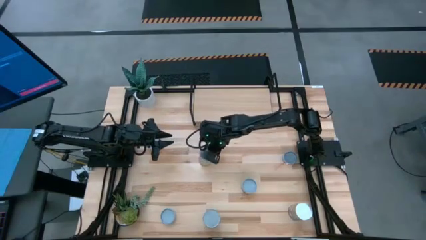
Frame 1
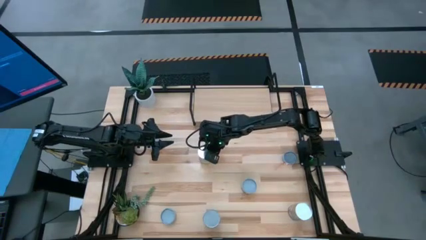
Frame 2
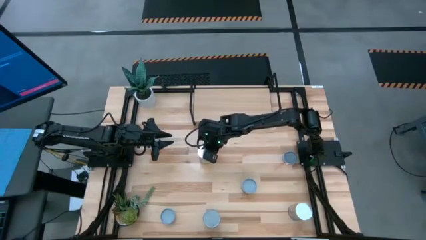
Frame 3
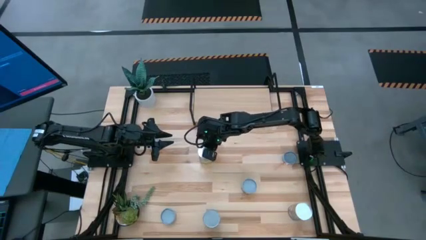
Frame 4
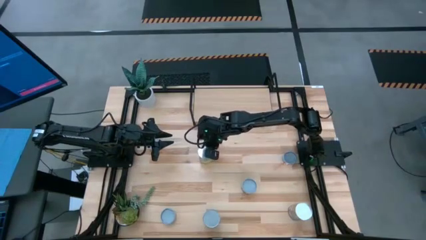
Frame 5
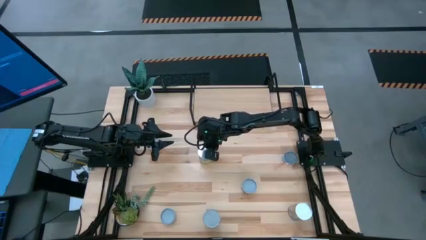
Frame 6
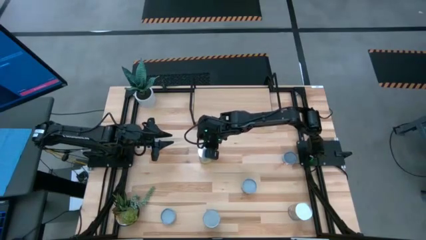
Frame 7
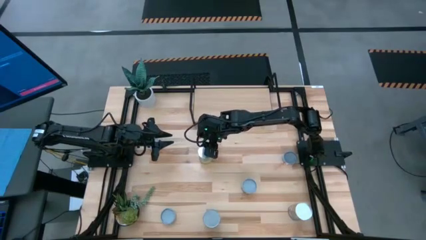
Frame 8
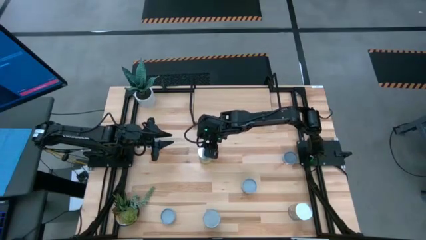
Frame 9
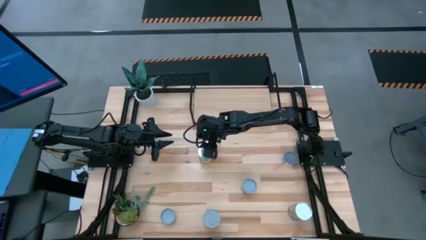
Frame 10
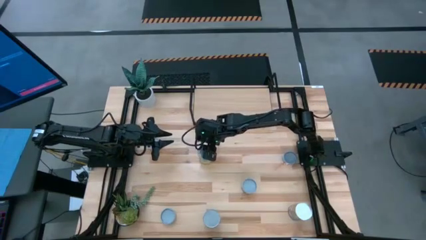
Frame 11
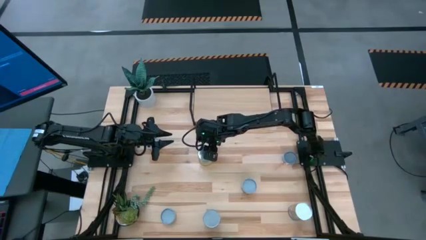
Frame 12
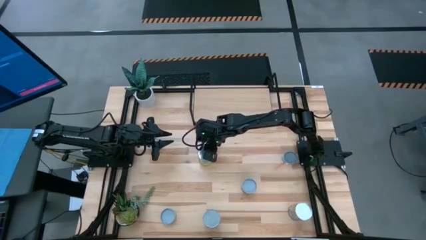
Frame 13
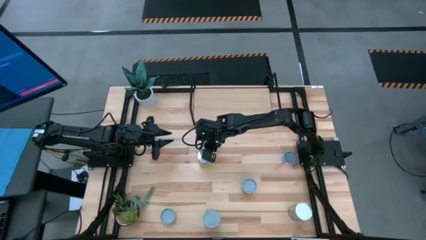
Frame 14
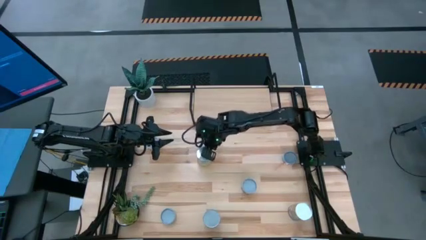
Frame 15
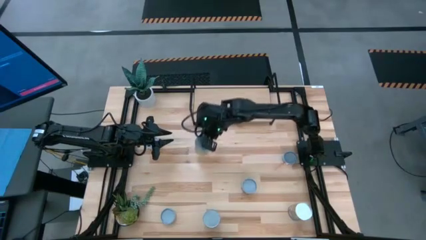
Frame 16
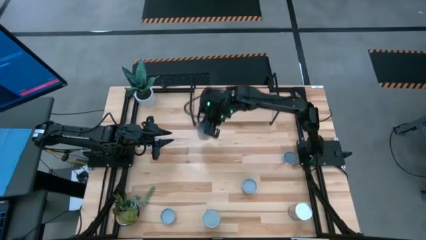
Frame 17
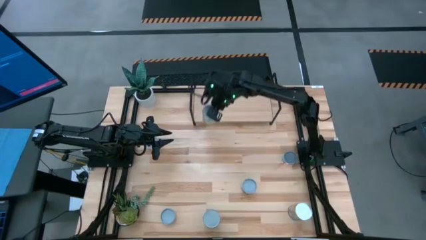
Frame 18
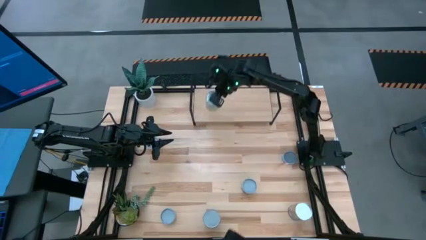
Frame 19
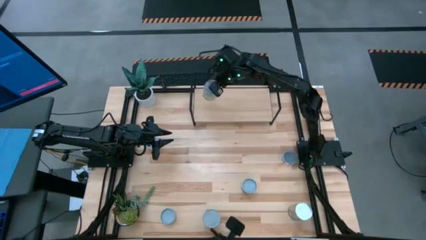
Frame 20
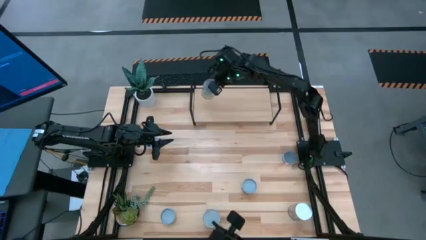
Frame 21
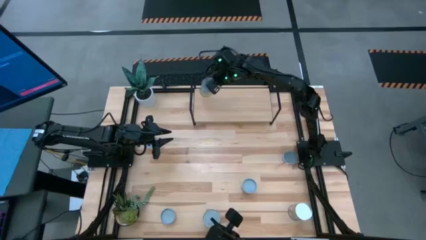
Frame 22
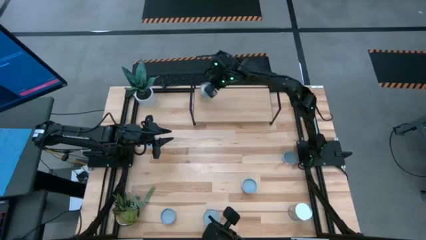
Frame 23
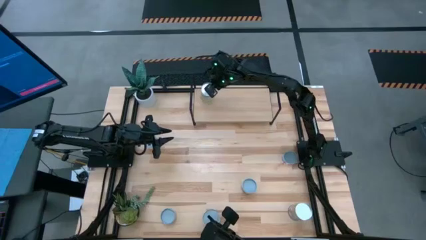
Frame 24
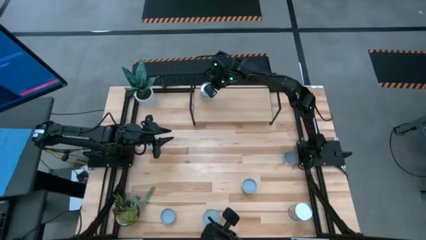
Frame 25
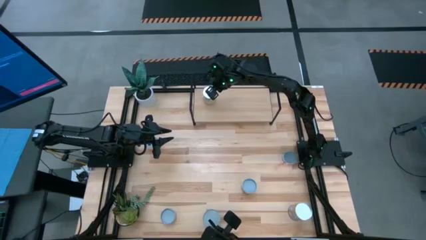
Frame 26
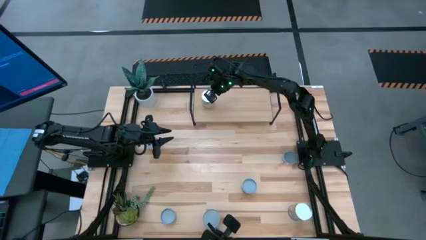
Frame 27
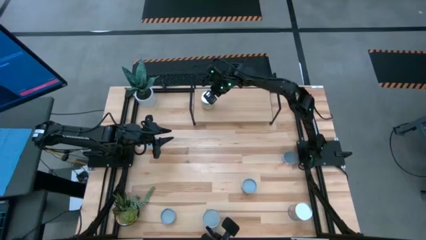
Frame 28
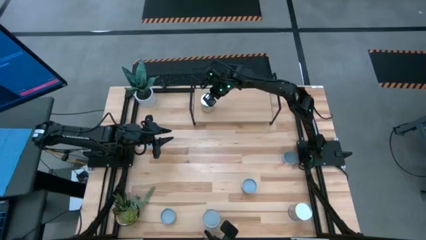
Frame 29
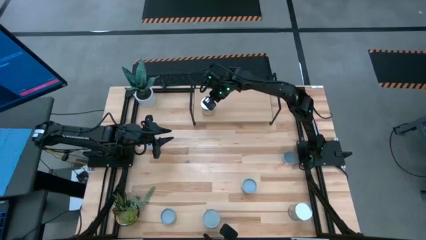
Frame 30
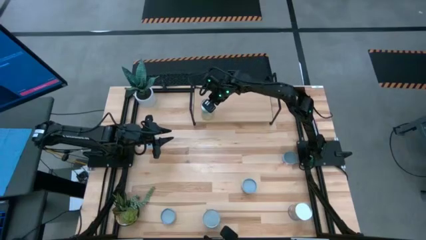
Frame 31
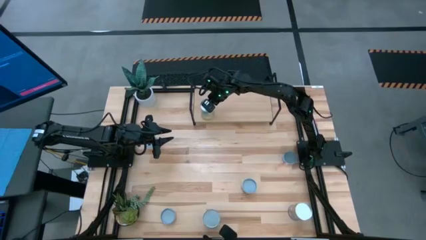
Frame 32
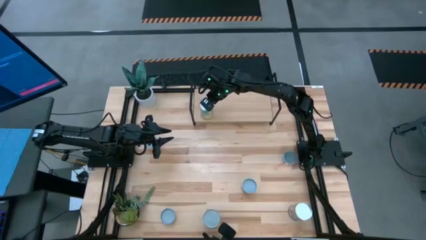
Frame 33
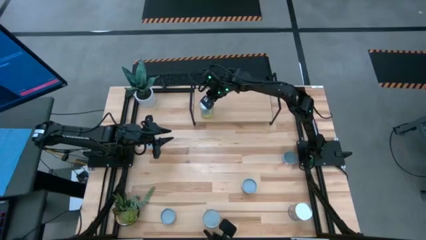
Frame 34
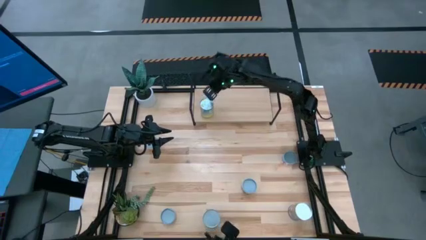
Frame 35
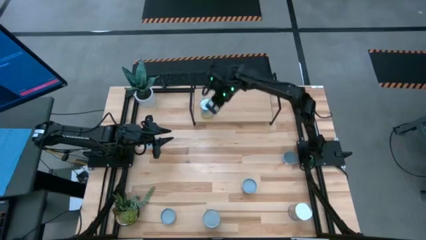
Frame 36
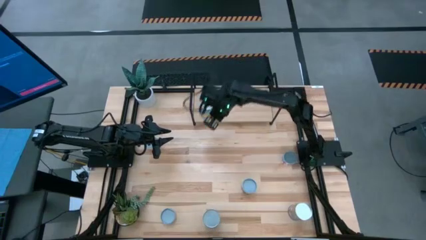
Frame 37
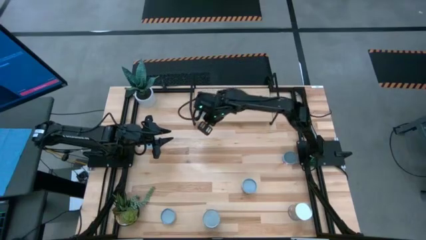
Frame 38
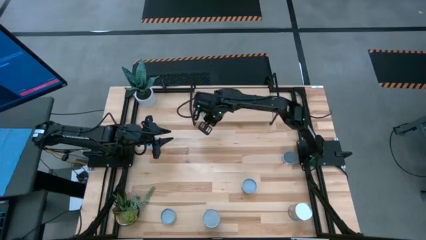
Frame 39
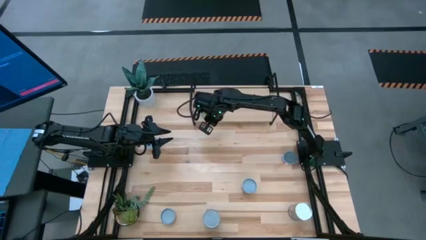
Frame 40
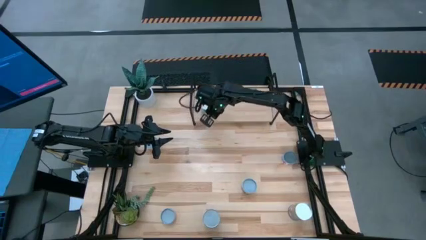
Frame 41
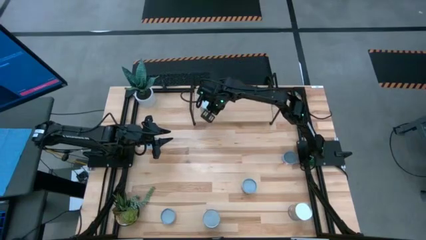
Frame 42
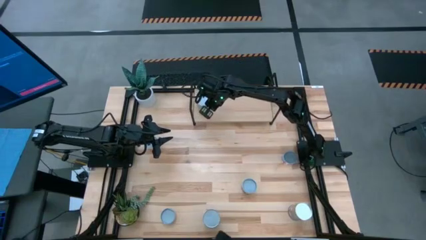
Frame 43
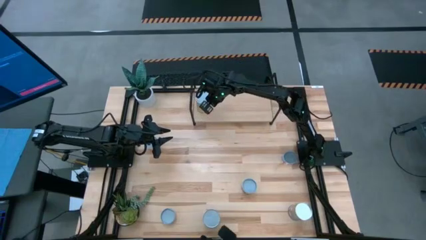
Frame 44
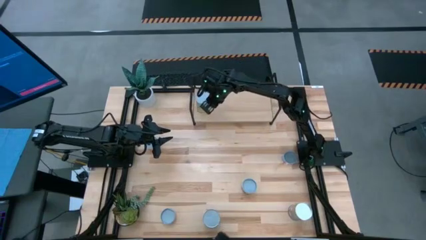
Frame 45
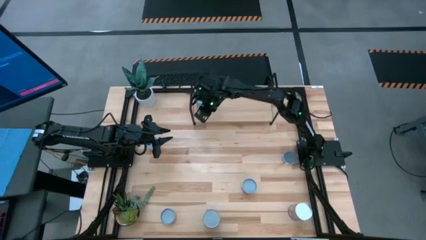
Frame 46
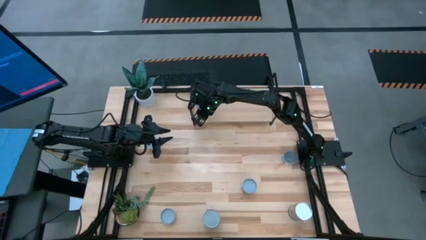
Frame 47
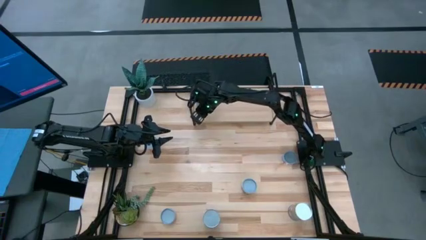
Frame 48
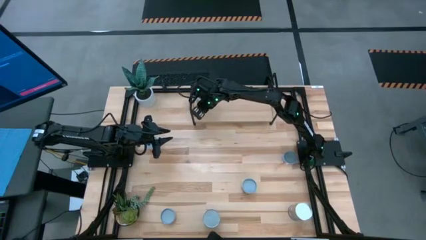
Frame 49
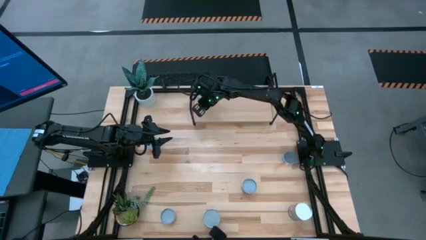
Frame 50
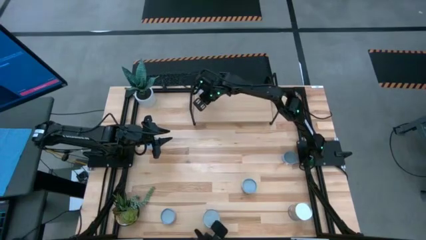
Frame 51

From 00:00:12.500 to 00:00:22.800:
Task: Pick and place cans onto a shelf
Put the canned carrots on the shelf

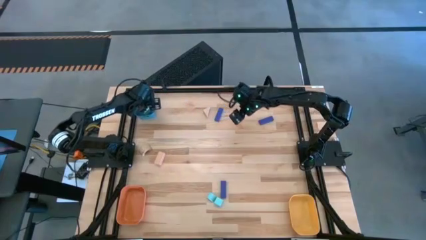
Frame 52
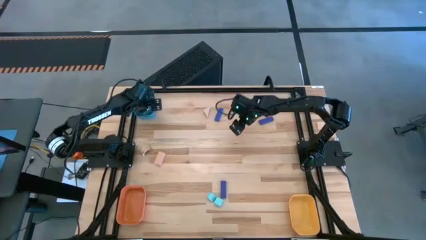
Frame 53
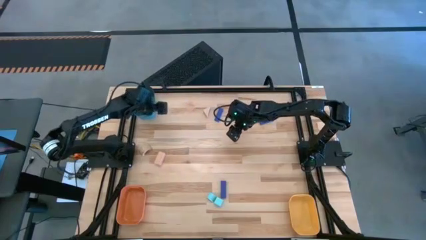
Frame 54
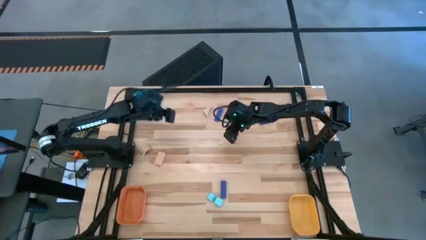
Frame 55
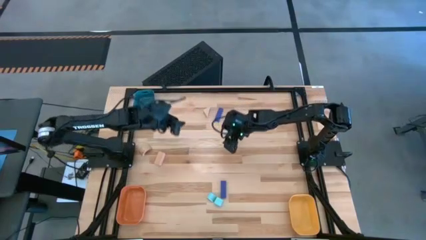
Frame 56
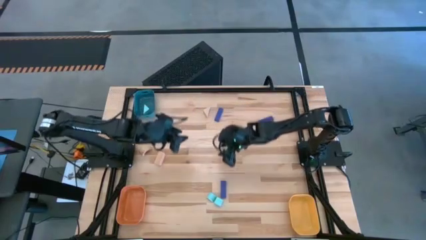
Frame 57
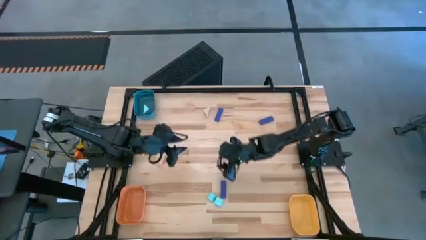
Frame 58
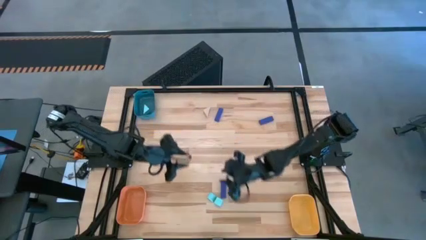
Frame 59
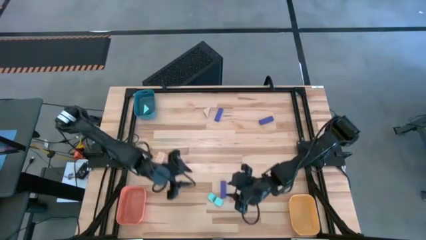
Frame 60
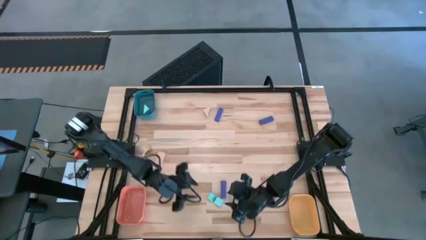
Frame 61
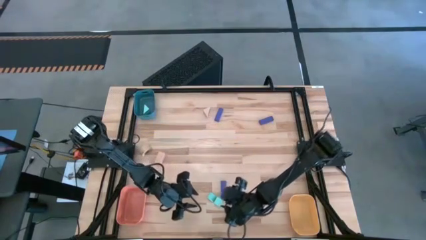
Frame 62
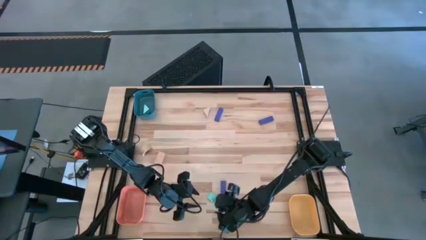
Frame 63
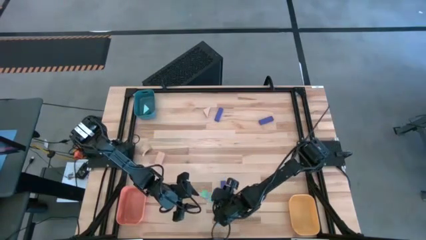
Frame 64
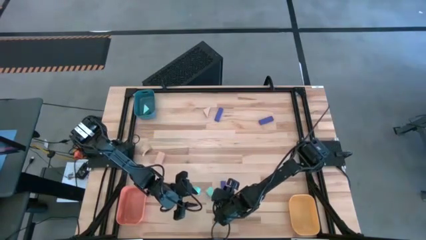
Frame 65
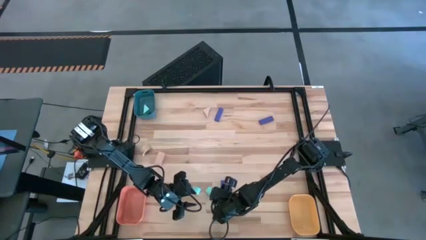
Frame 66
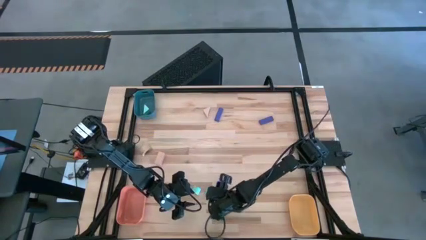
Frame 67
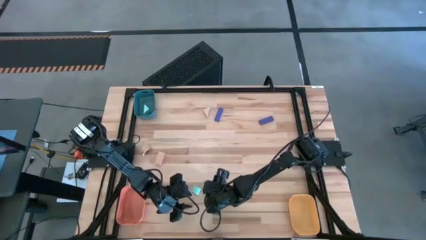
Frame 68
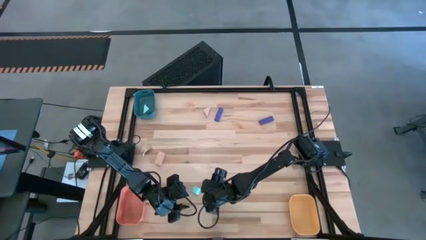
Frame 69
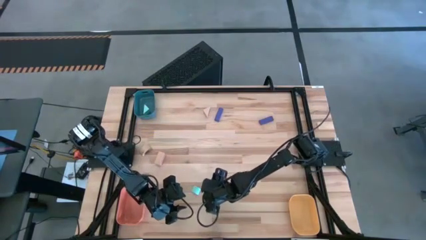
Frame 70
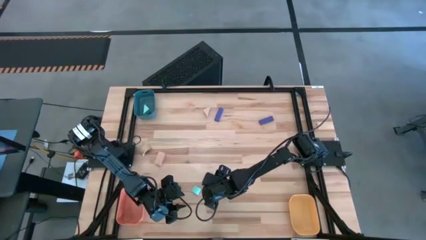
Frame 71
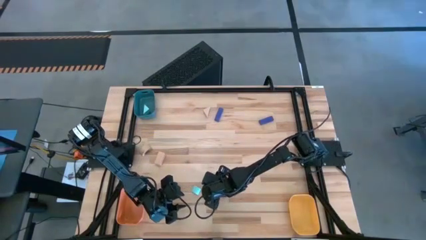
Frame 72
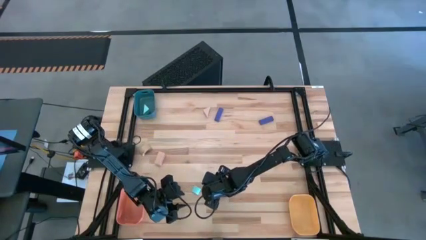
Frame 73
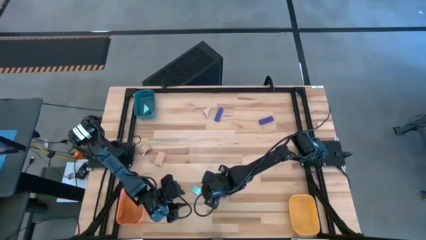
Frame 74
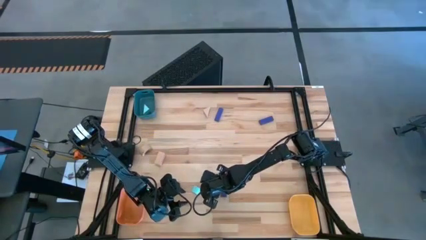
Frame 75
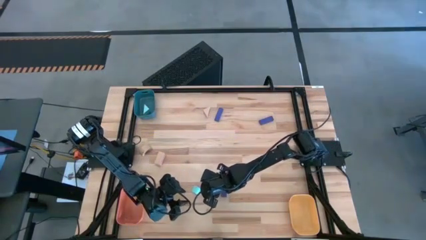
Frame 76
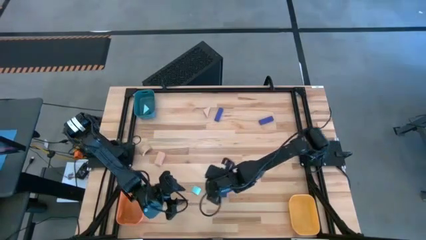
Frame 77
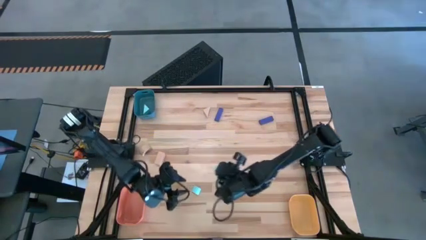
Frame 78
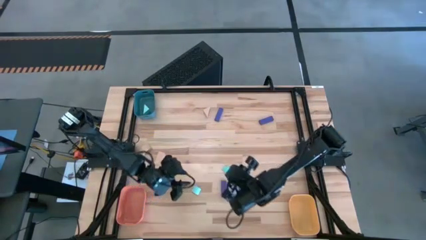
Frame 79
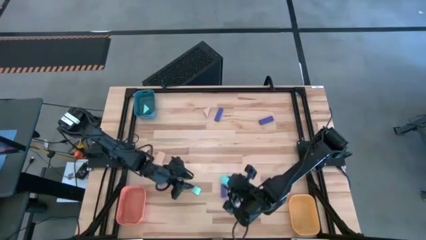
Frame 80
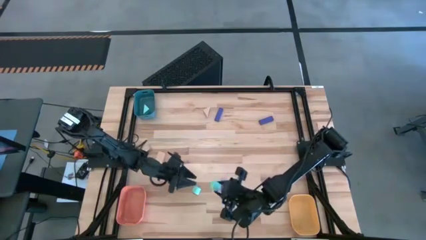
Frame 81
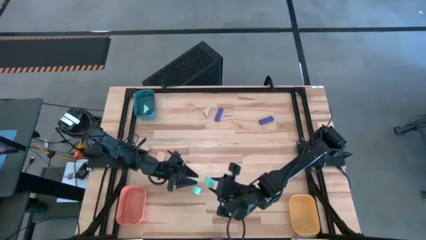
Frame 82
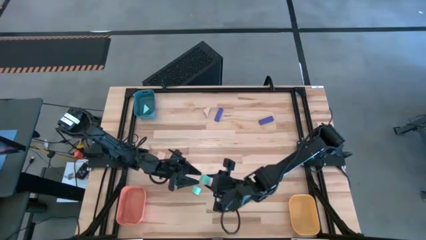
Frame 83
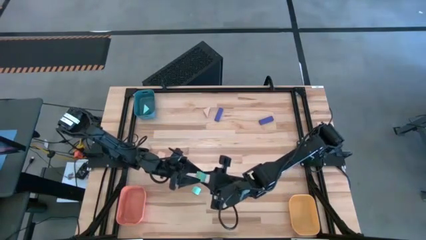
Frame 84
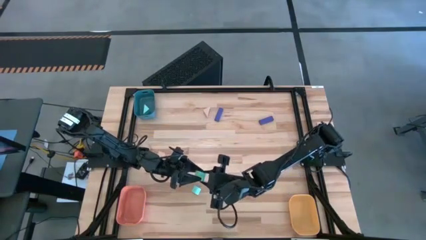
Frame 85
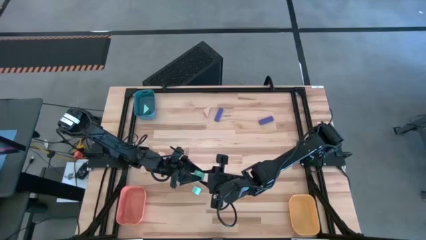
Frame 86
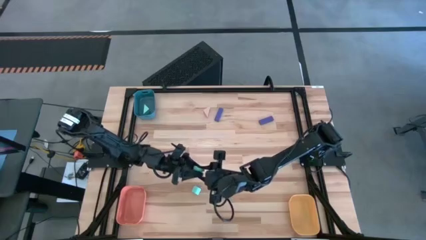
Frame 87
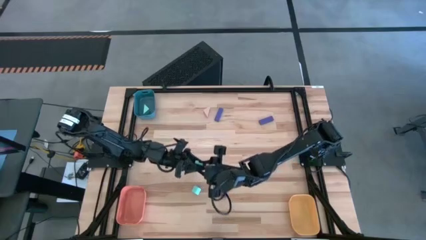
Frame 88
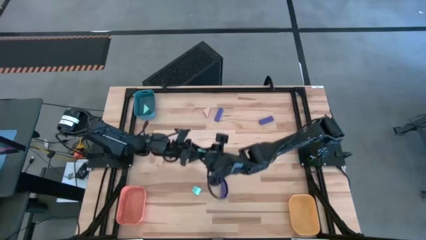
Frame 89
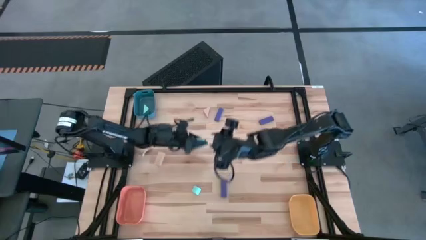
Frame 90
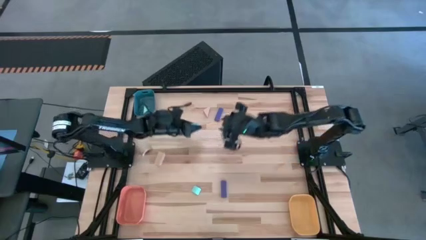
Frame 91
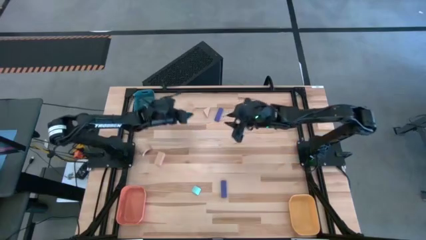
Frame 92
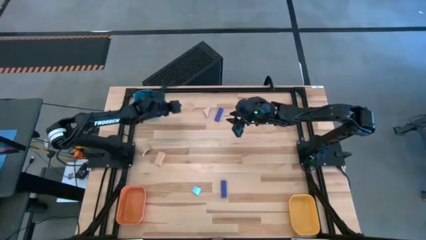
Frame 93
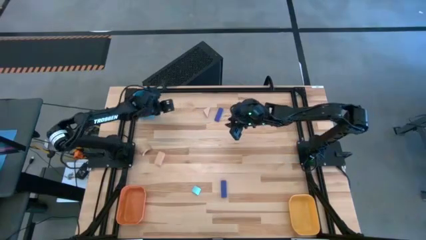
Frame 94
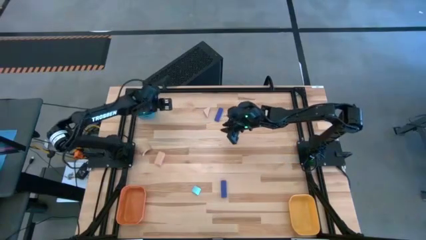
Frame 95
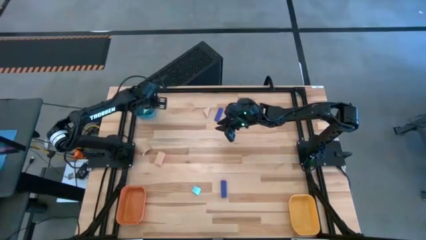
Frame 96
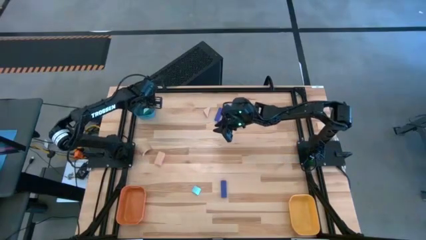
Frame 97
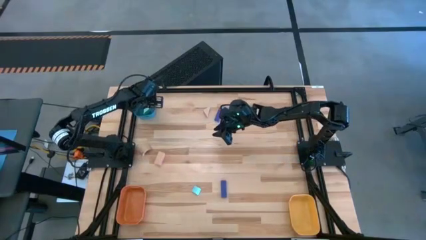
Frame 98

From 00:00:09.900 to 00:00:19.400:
Task: Sort & place blocks by color
Put the right light blue block into the blue bin
